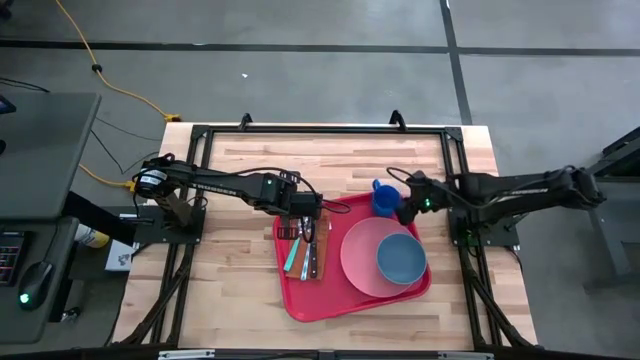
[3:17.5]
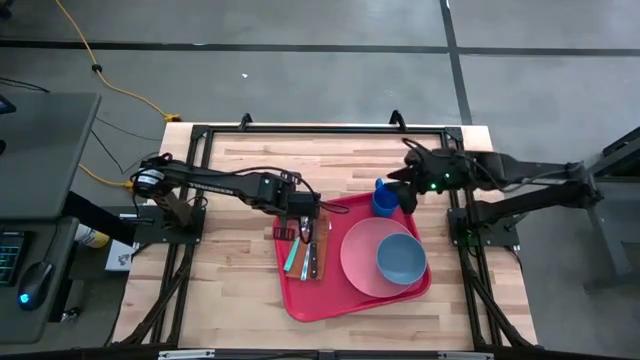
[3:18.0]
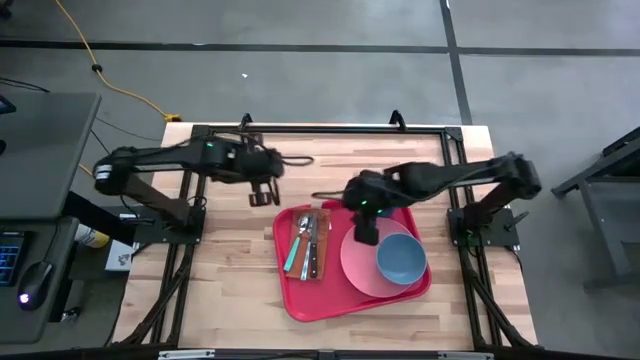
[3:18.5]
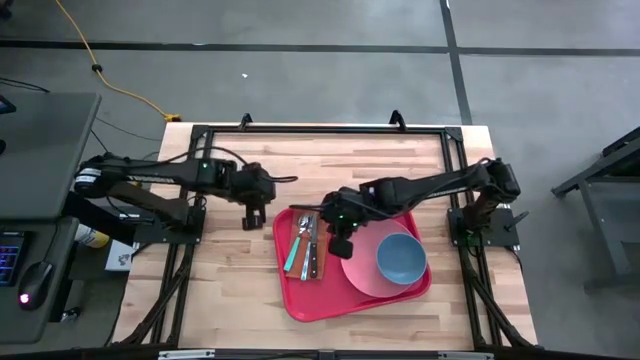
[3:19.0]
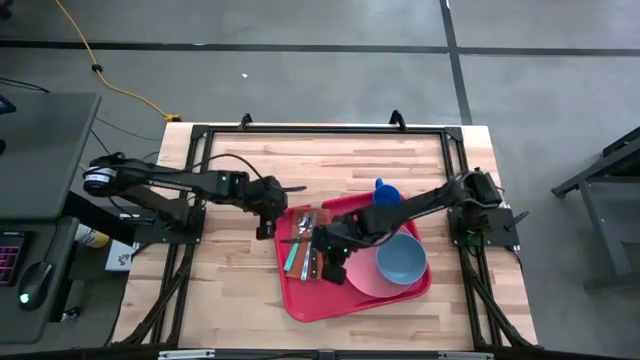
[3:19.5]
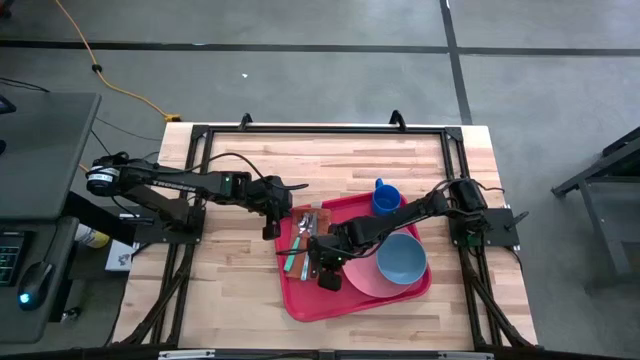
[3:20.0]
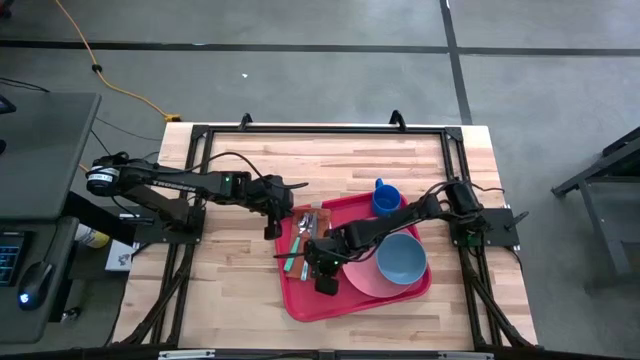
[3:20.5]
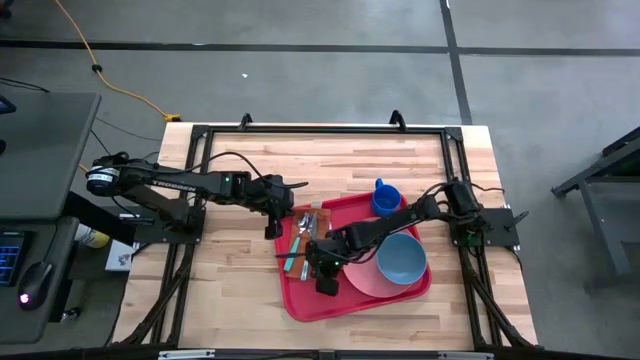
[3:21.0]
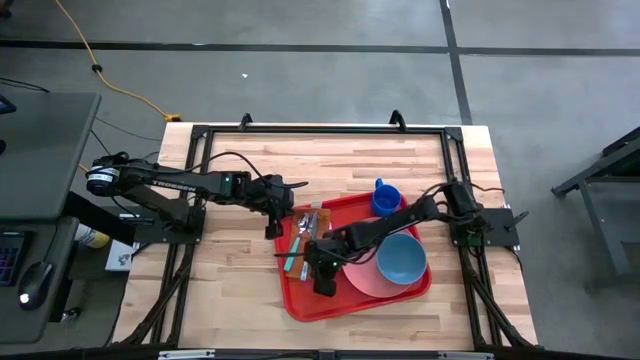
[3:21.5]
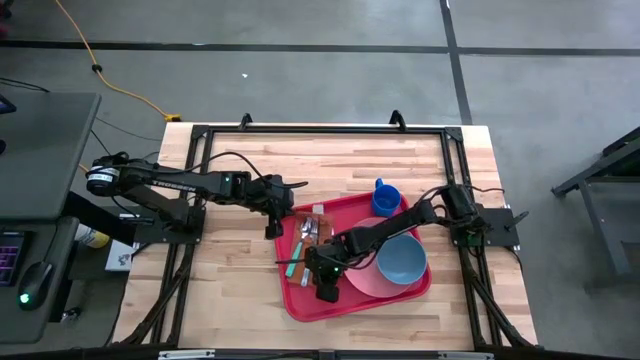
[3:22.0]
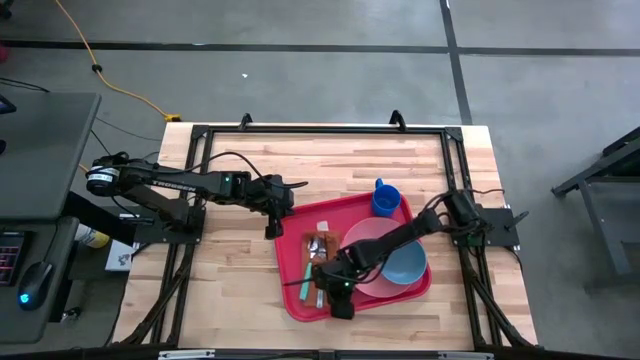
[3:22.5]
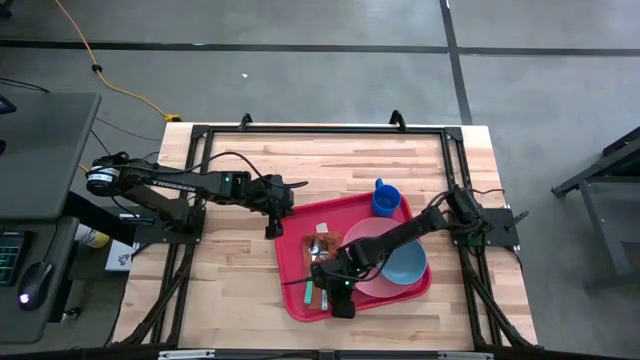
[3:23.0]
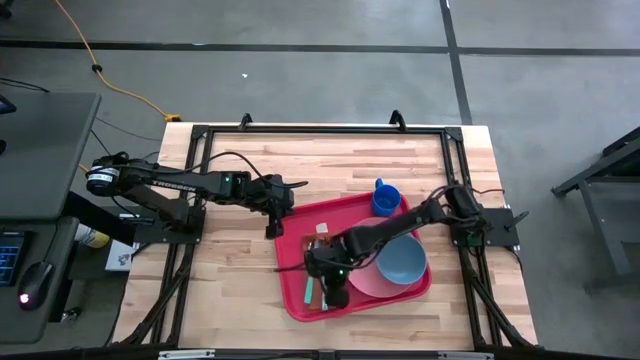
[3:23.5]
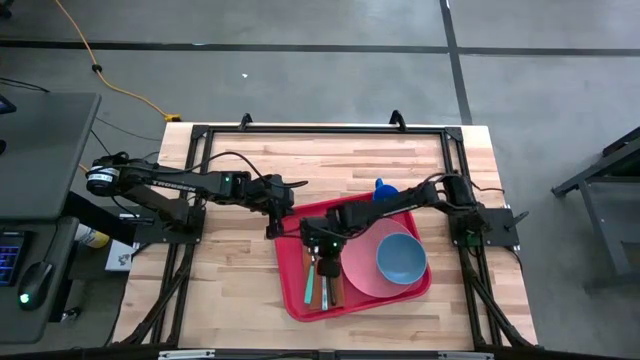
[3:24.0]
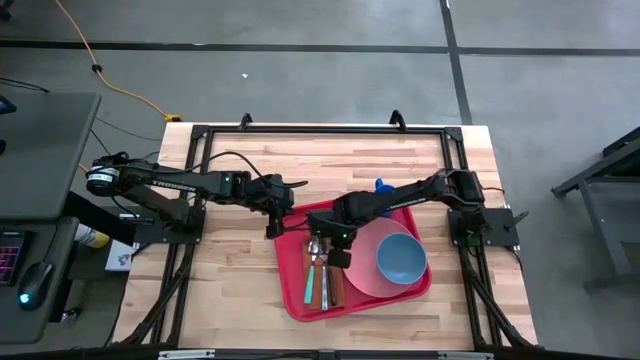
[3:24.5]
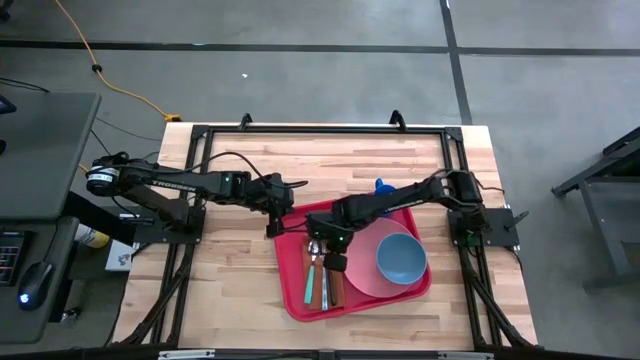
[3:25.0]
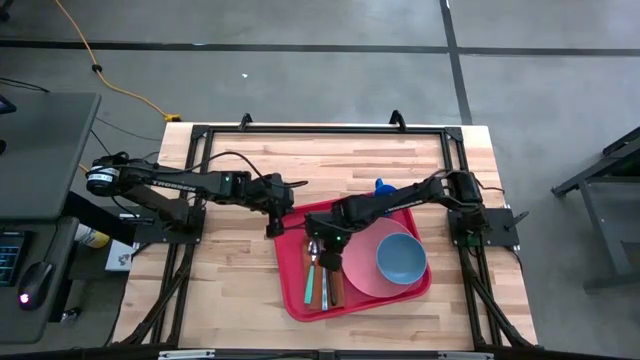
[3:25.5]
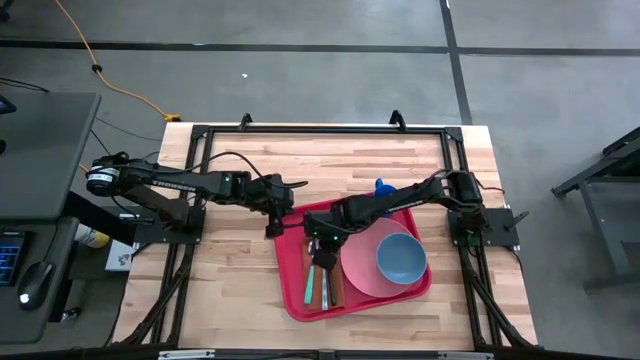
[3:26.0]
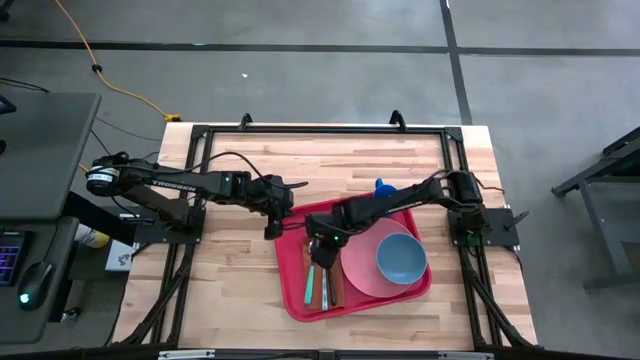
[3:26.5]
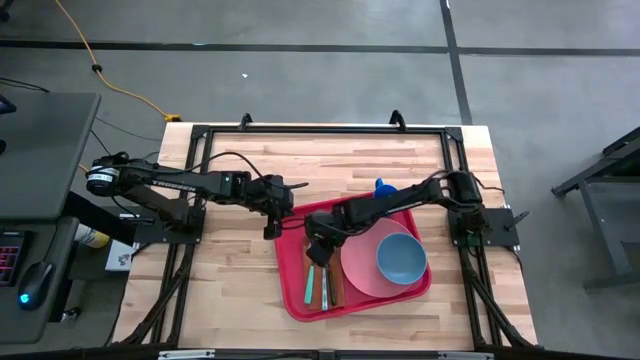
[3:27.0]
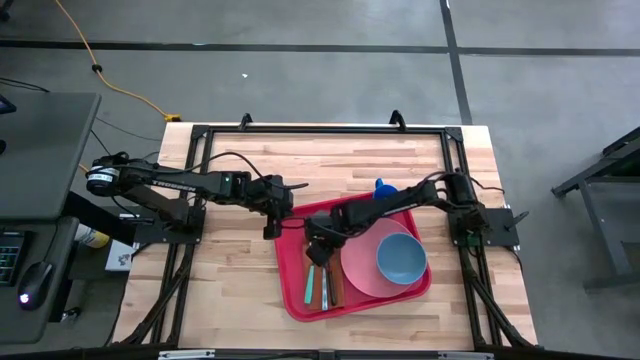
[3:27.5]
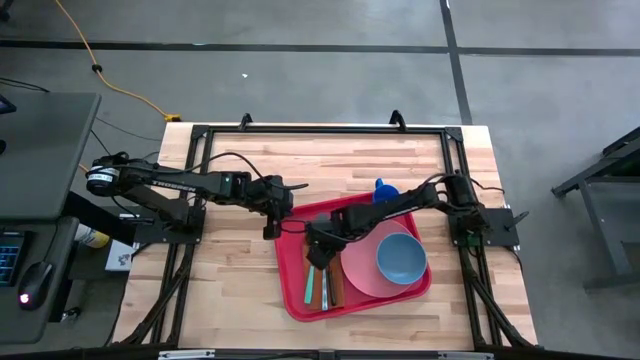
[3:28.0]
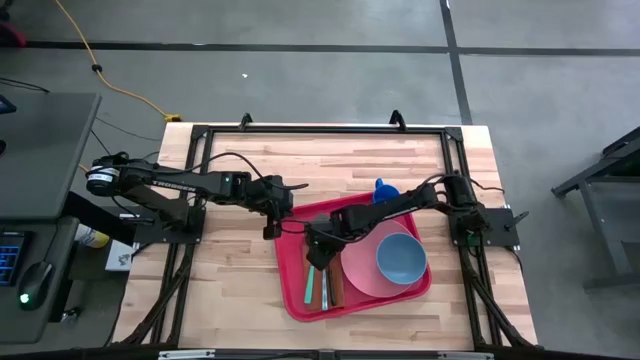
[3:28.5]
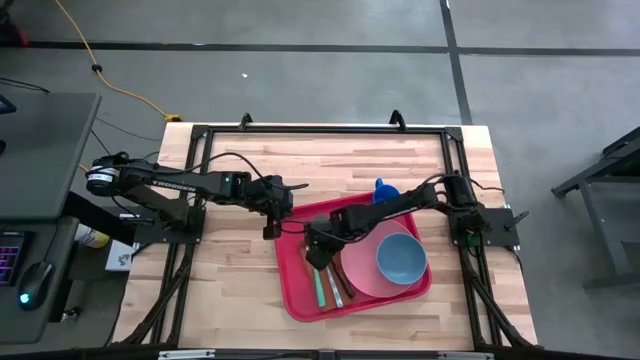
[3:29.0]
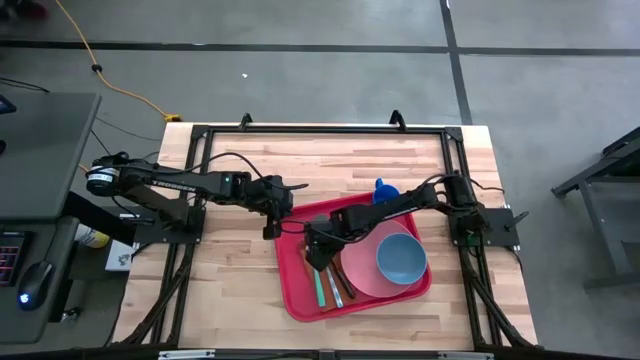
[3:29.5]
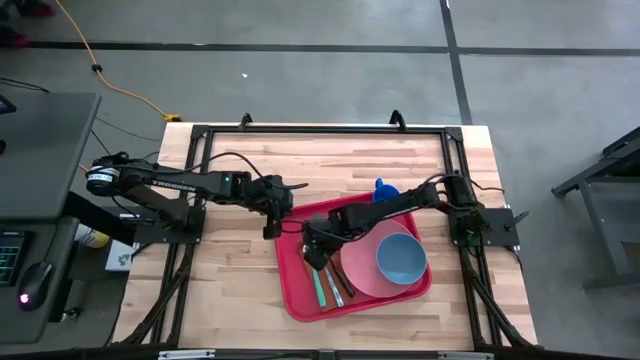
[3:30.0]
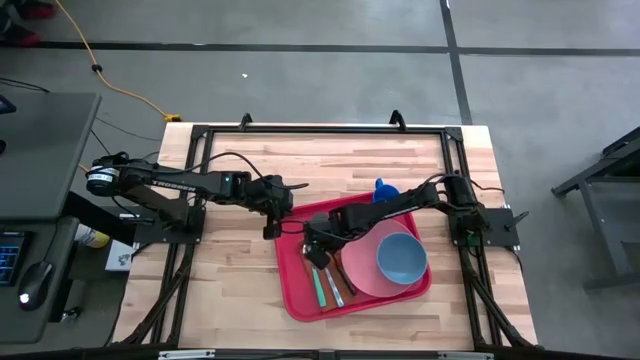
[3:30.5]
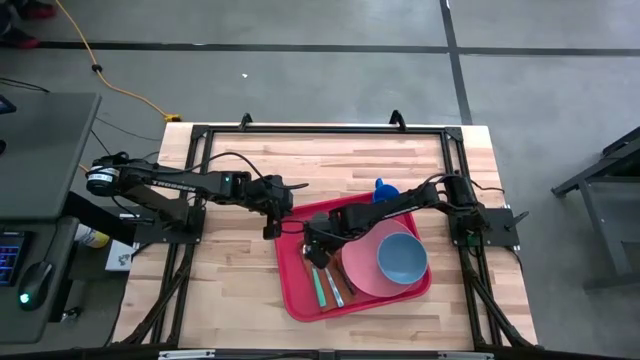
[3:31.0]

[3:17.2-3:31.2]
Task: Set up tray
Adjust the knife on the orange napkin

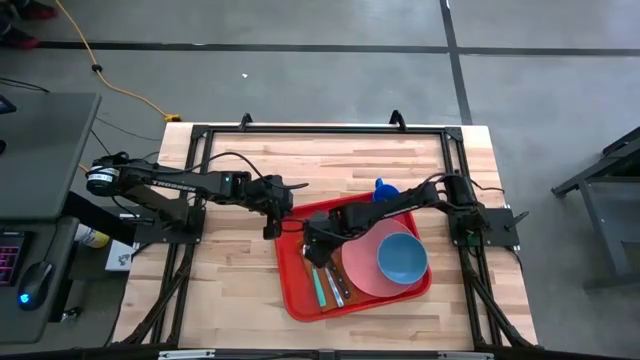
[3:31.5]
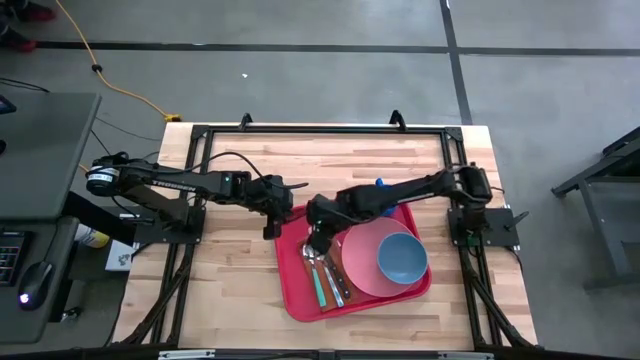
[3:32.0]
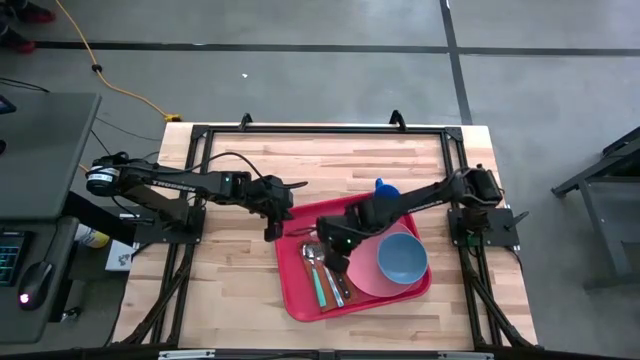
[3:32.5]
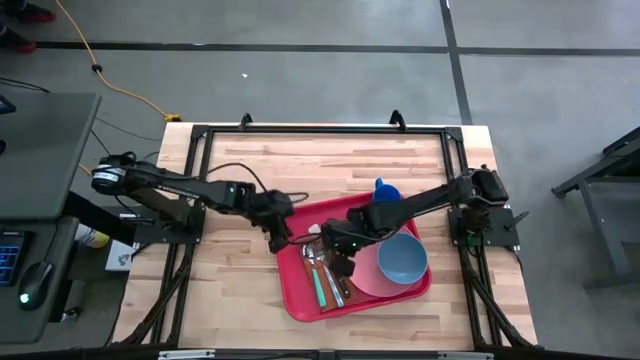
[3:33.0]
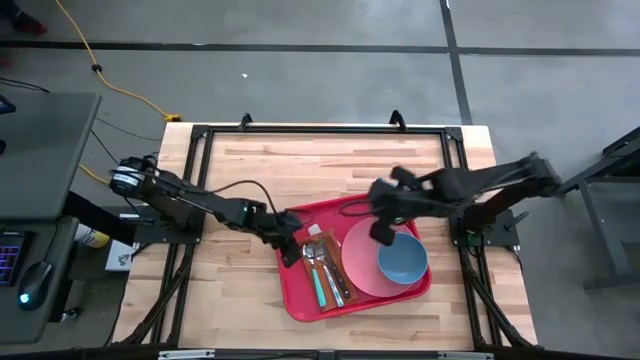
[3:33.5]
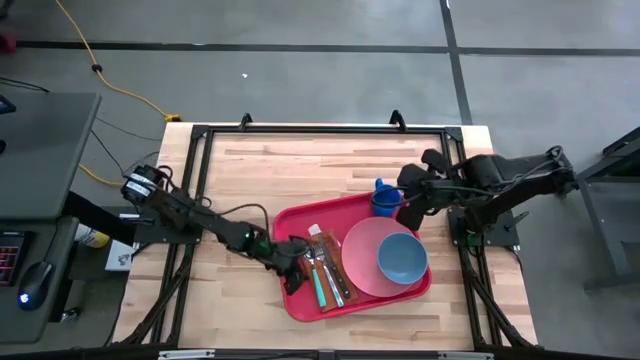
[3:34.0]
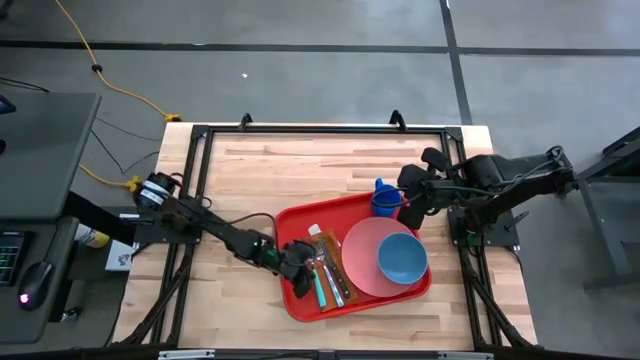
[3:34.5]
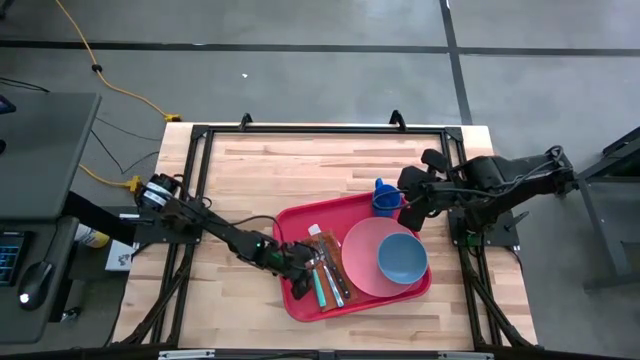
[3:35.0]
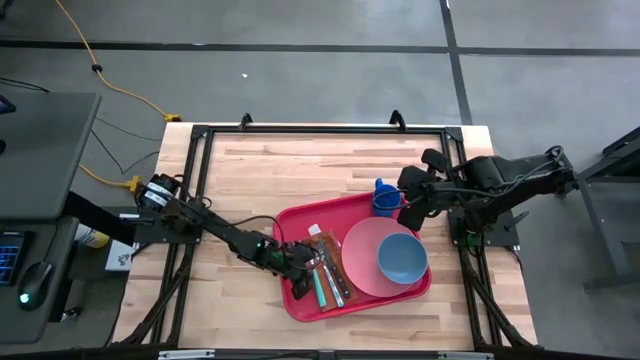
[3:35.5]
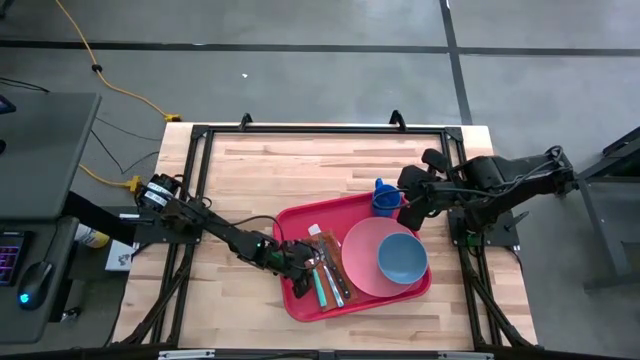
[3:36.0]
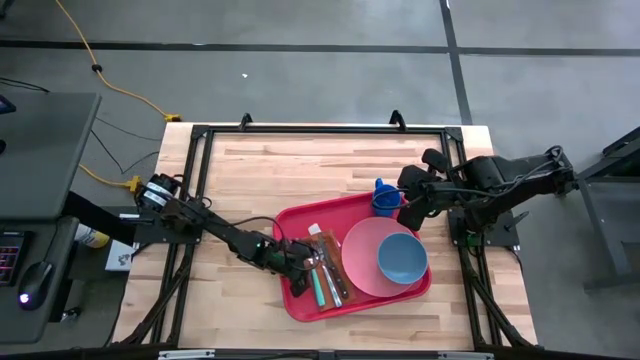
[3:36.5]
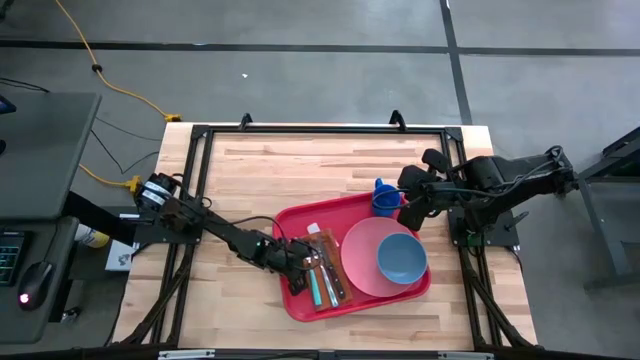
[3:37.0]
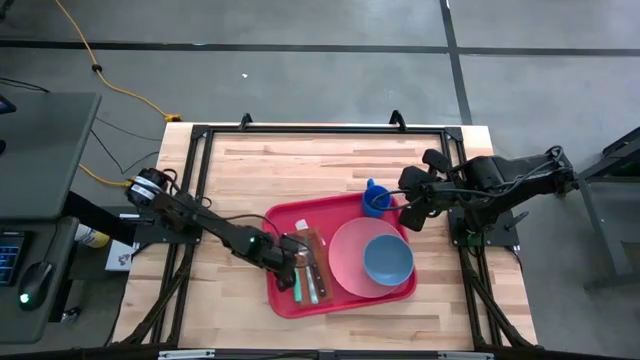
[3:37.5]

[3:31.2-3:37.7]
Adjust the orange napkin on the red serving tray

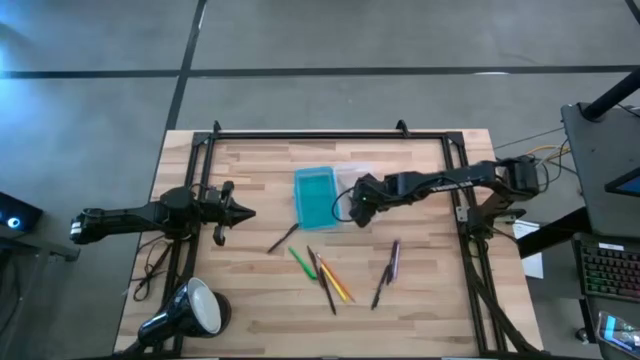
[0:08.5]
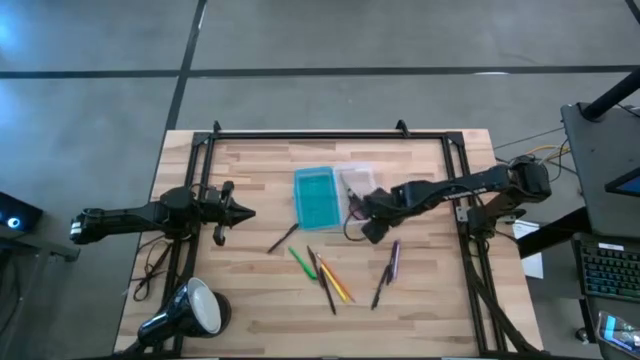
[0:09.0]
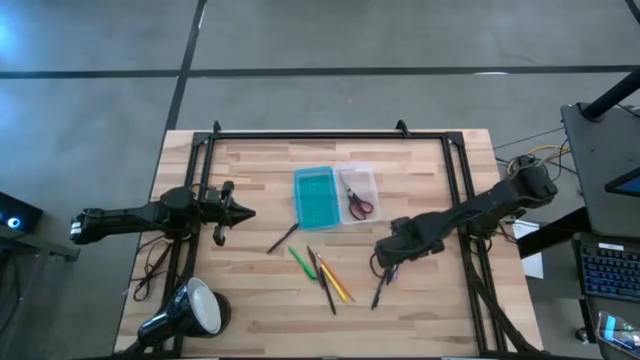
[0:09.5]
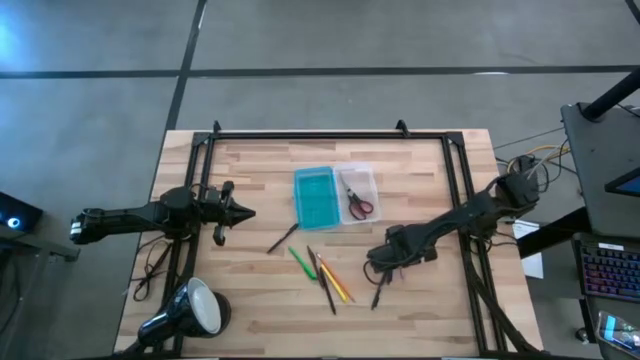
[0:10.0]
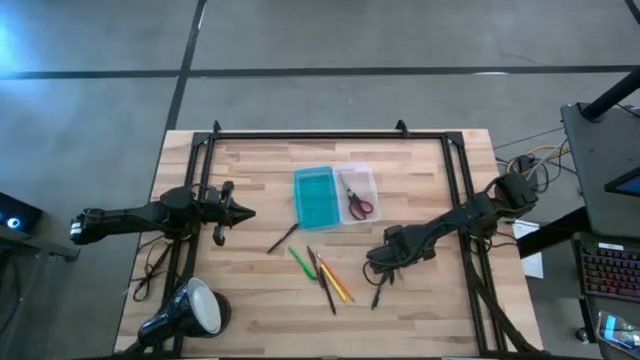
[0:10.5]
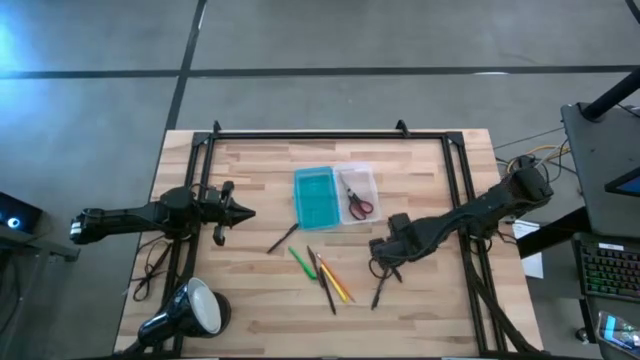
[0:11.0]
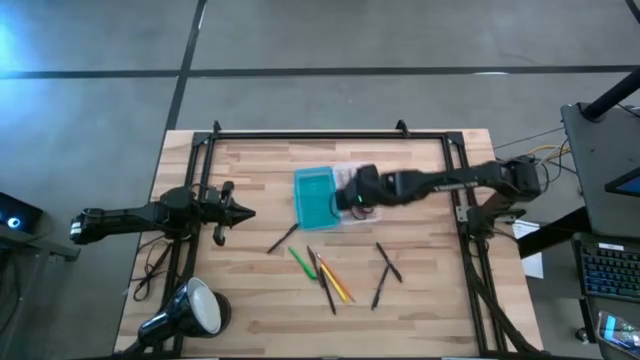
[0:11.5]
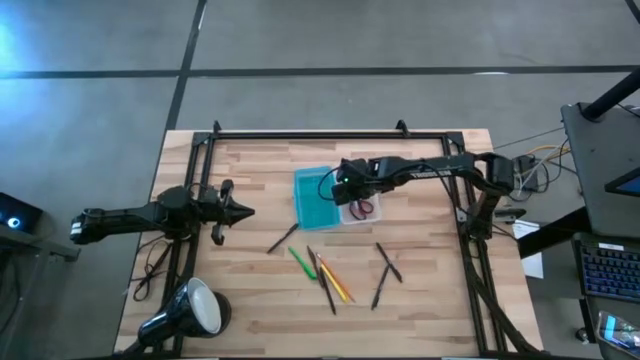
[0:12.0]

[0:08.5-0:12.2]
Task: Pick & place school supplies into a supply box
Put the purple pen into the blue supply box
